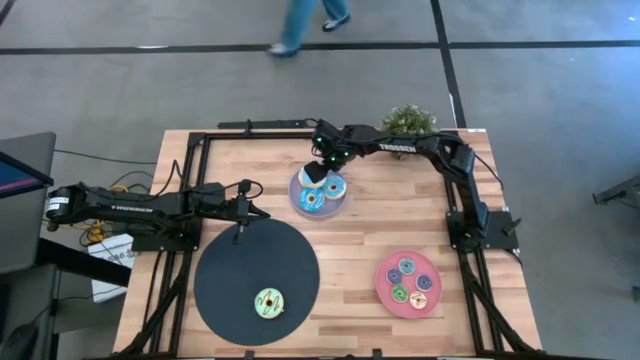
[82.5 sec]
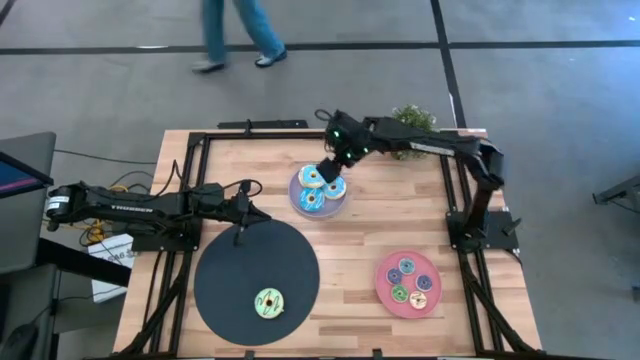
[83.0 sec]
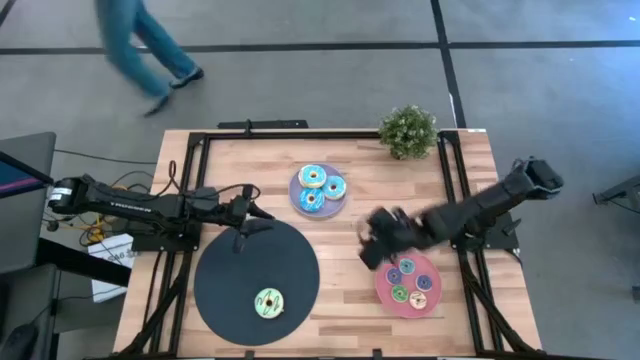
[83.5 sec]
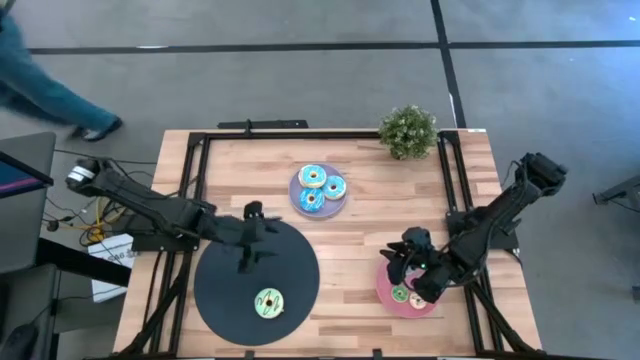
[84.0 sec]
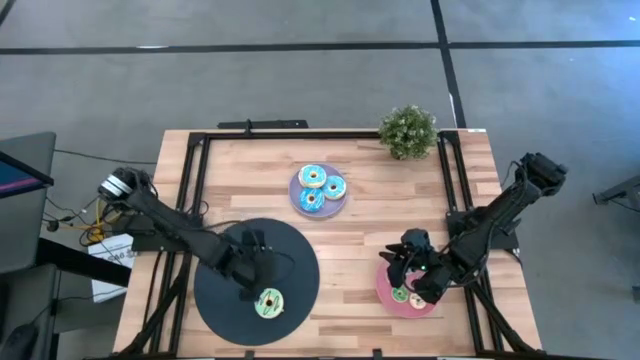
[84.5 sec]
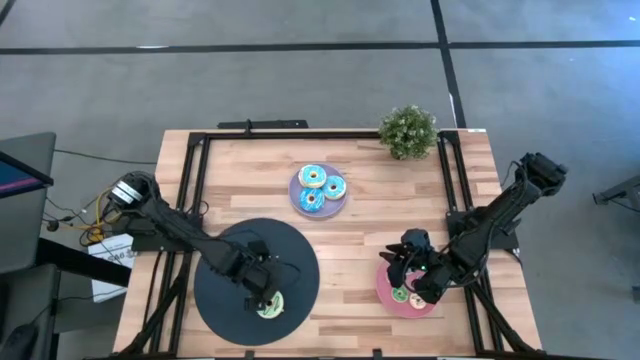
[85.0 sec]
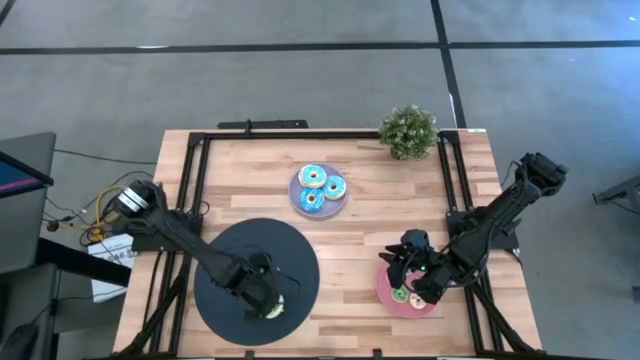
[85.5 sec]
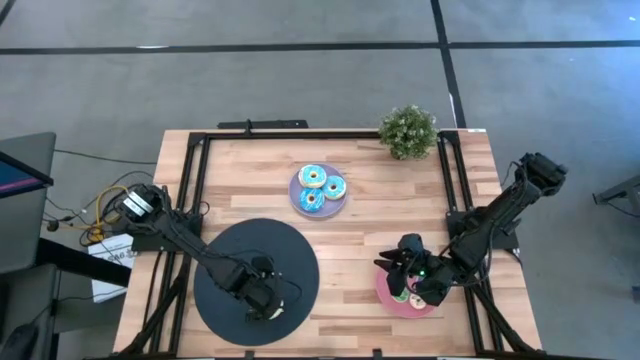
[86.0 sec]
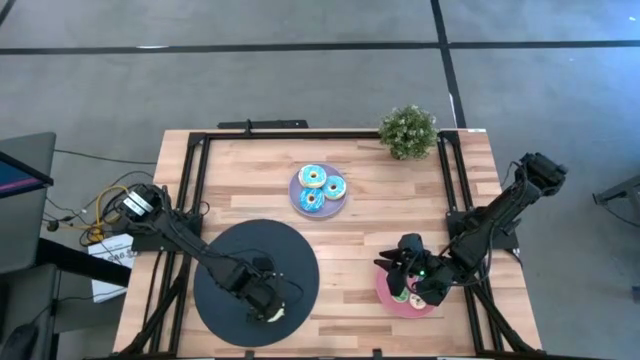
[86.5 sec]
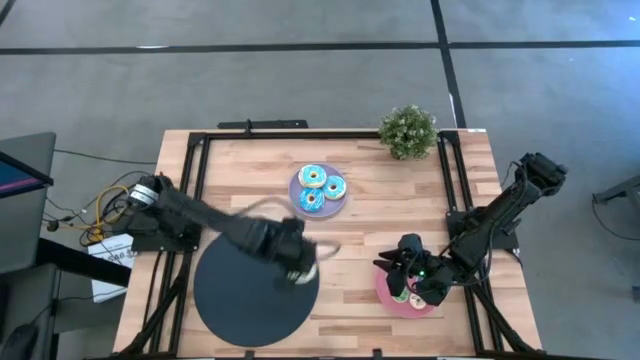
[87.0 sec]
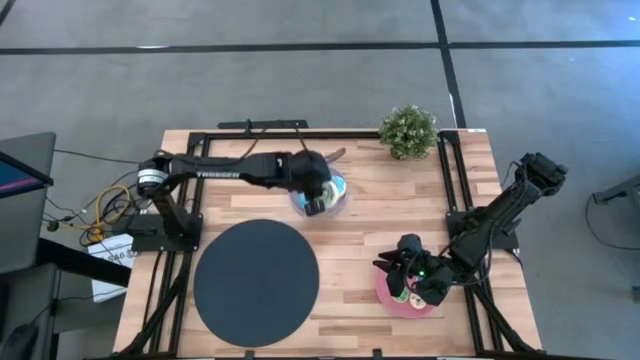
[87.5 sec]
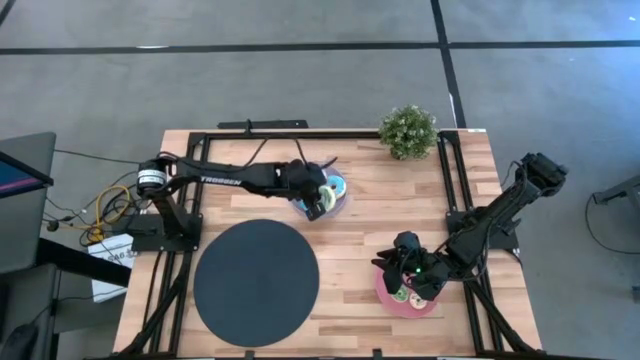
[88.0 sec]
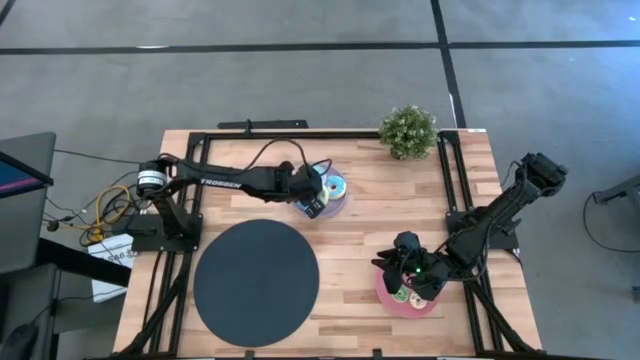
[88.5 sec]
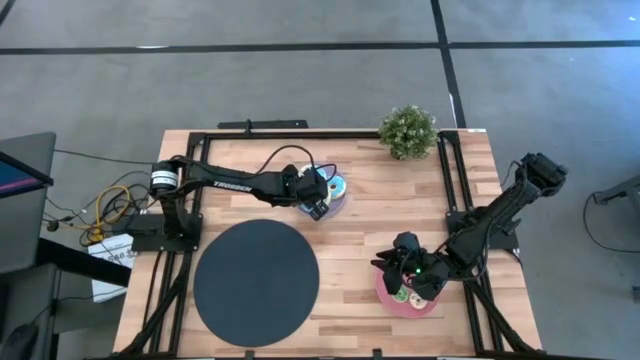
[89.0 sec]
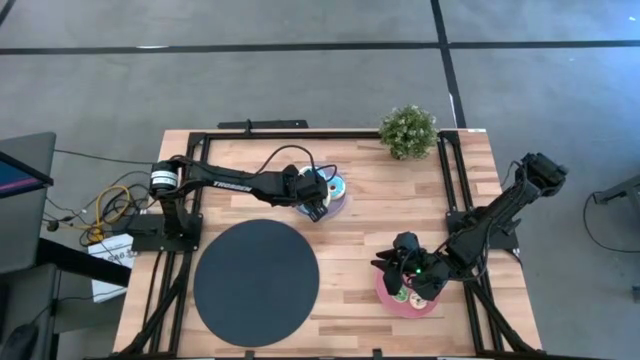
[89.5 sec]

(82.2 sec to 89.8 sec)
Task: Pick & Place donuts
Put the large light green donut on the purple plate

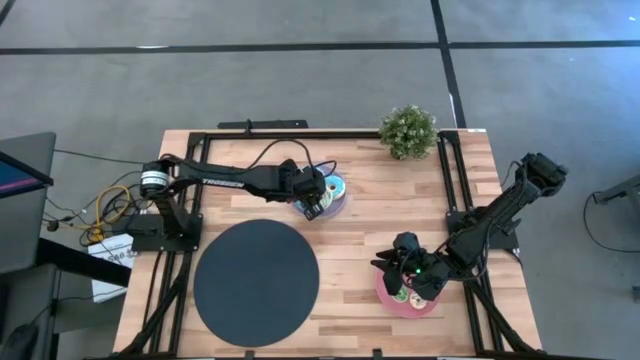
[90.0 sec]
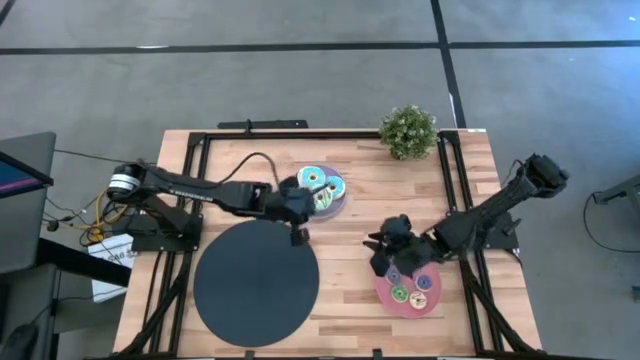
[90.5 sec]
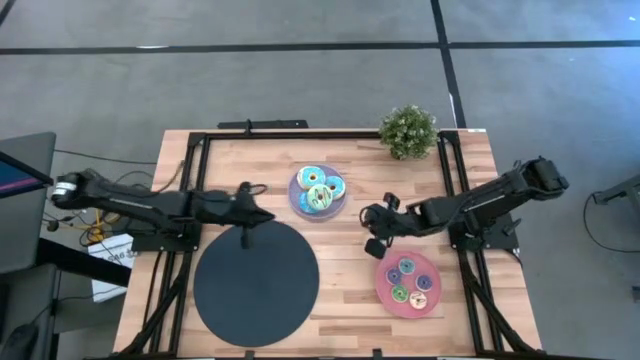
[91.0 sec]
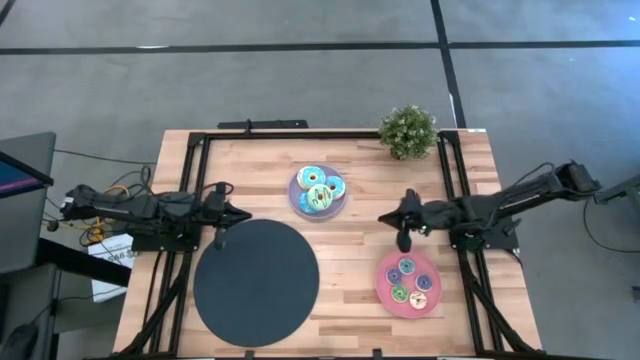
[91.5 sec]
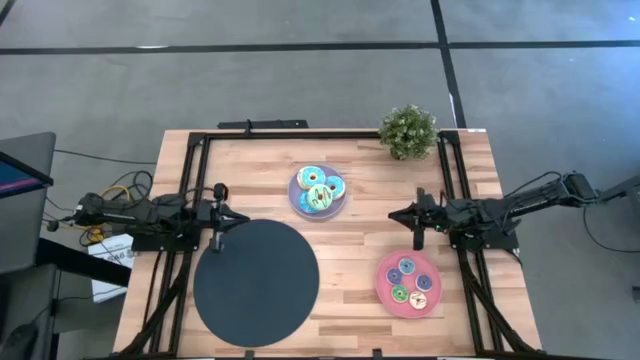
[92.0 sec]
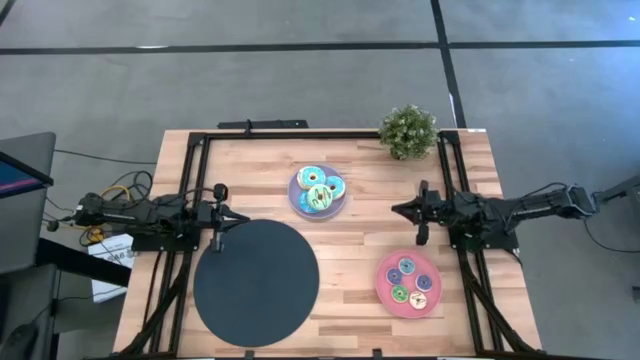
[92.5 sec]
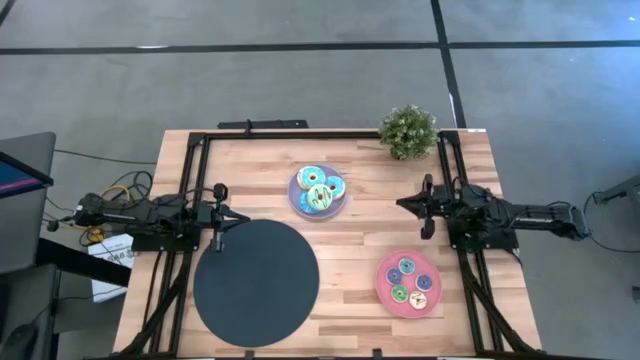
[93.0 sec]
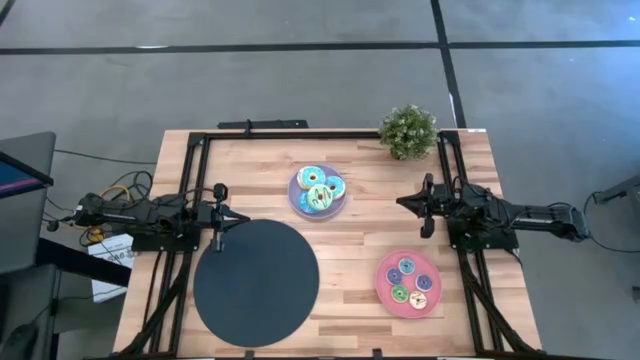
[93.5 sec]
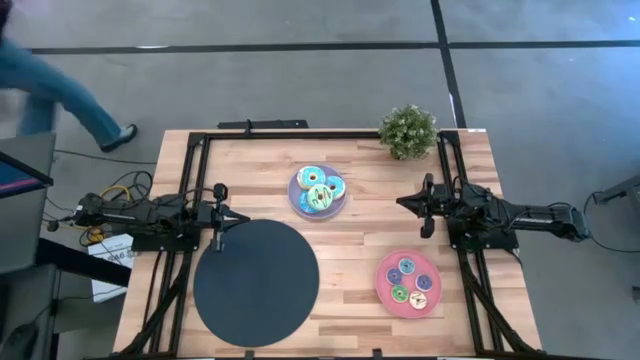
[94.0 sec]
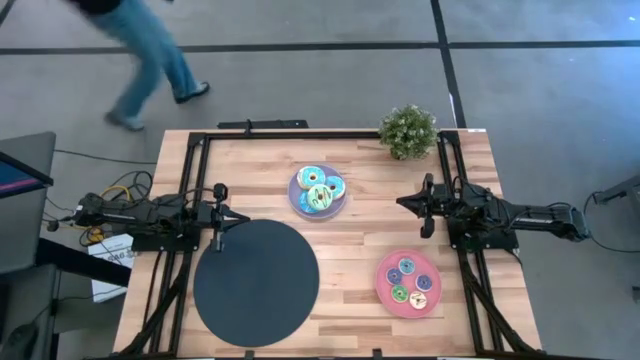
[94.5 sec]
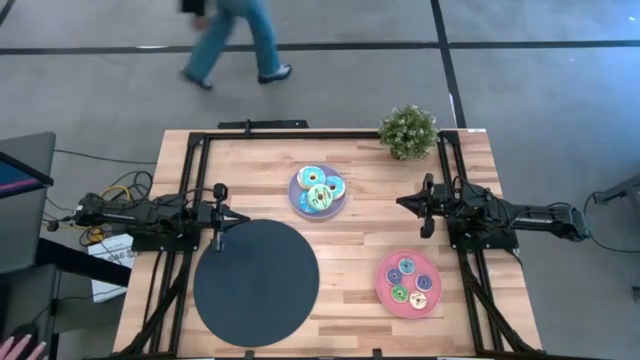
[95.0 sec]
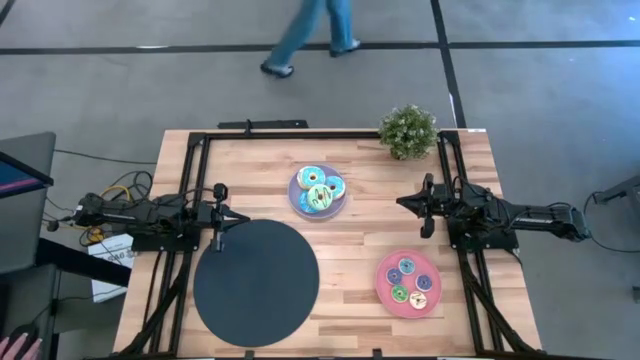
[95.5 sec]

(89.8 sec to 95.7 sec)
Return to Home Position

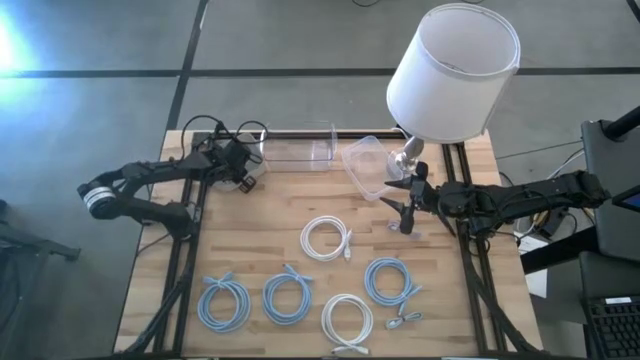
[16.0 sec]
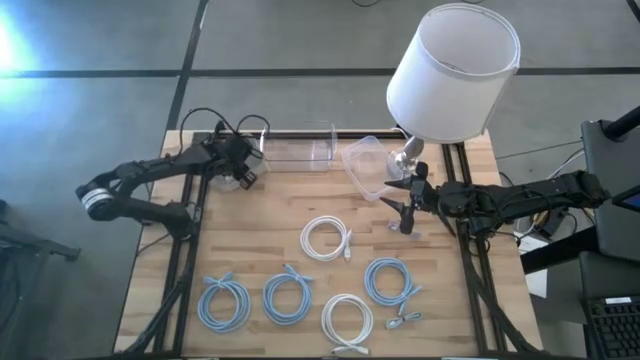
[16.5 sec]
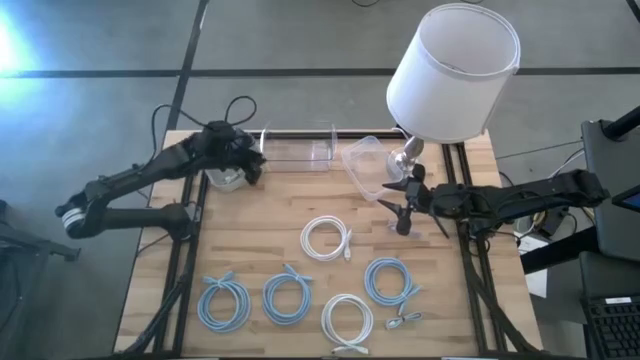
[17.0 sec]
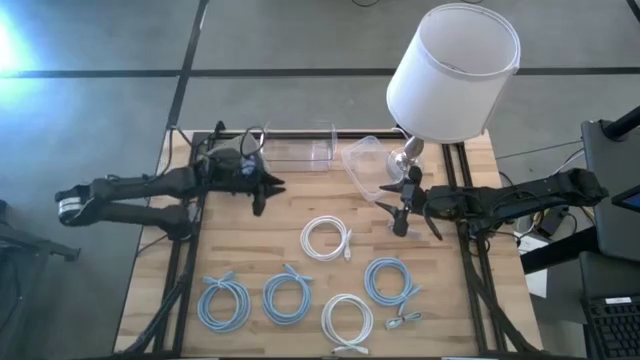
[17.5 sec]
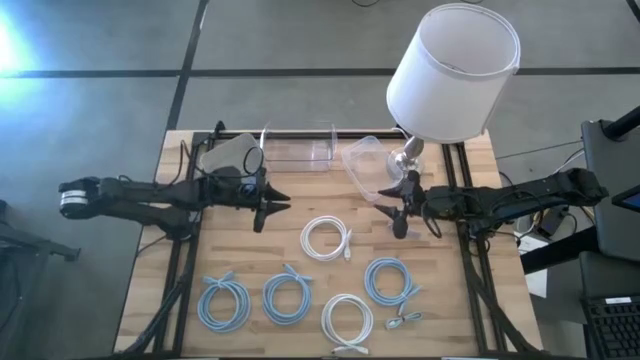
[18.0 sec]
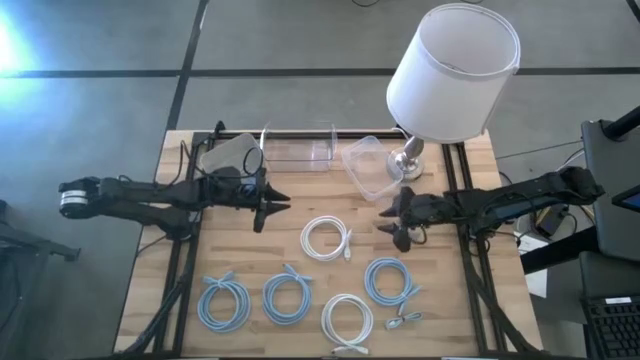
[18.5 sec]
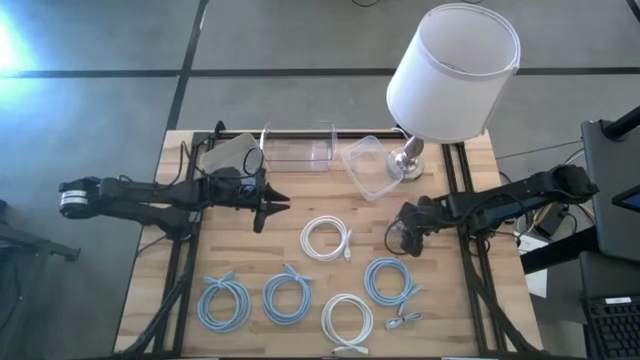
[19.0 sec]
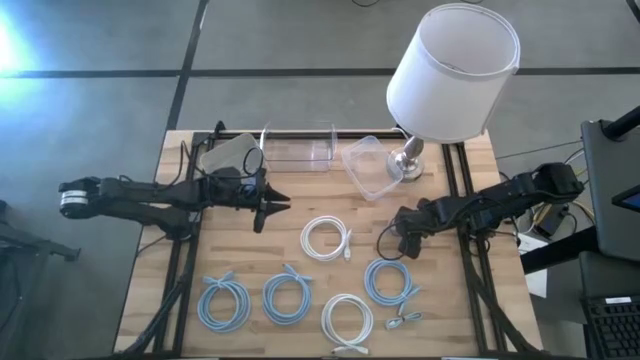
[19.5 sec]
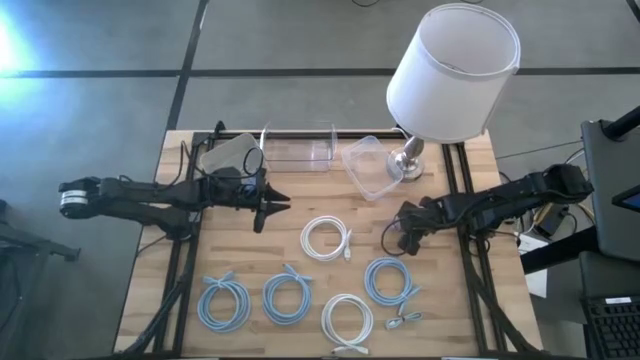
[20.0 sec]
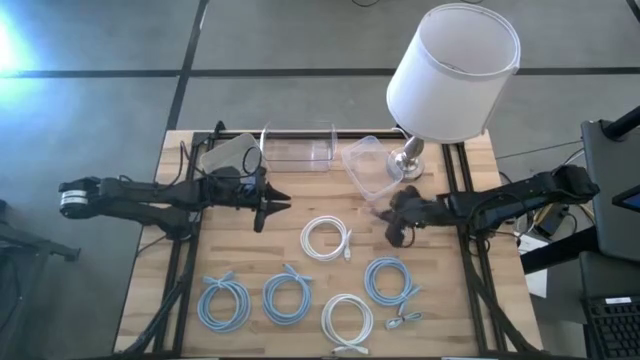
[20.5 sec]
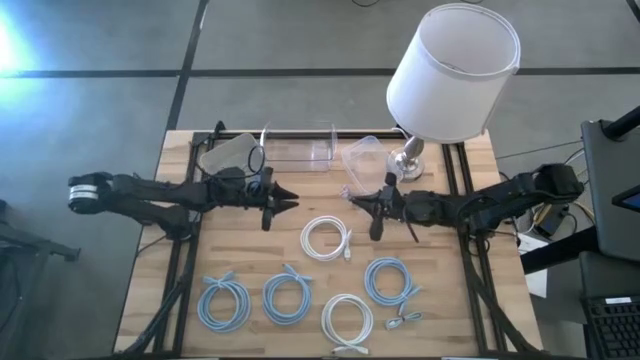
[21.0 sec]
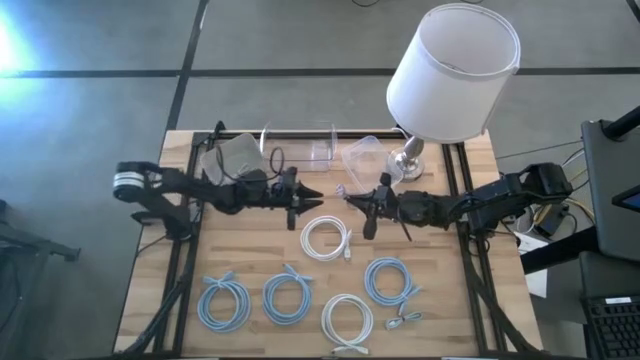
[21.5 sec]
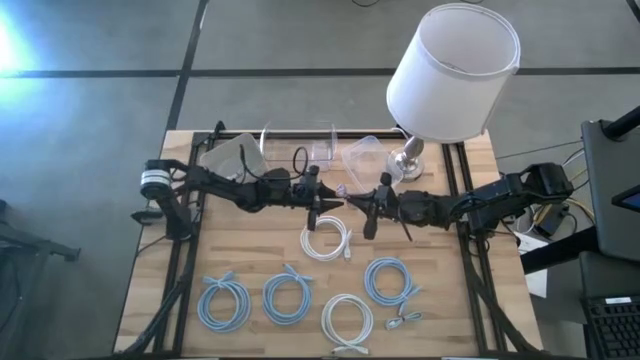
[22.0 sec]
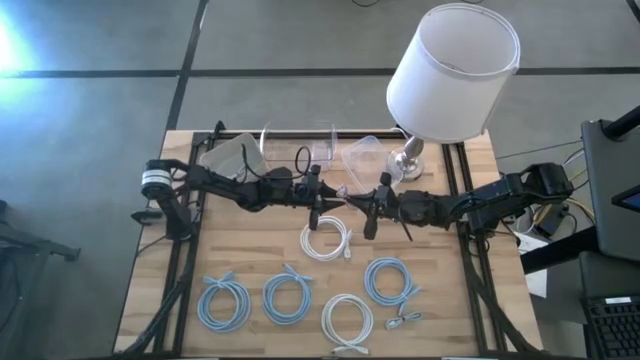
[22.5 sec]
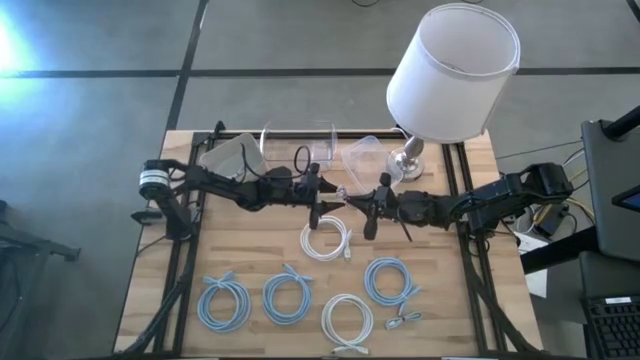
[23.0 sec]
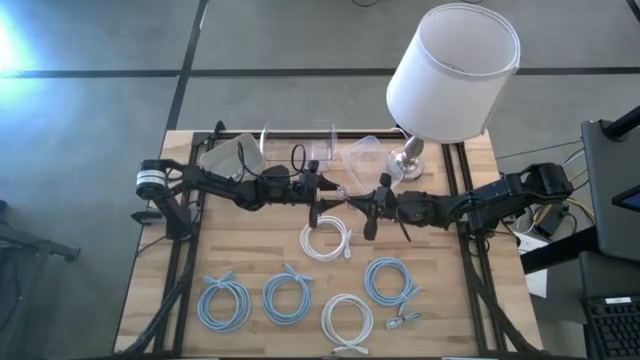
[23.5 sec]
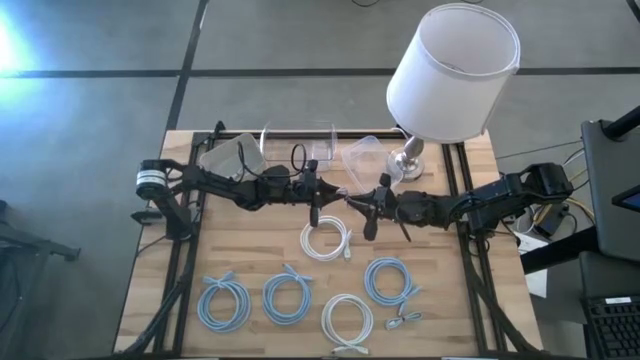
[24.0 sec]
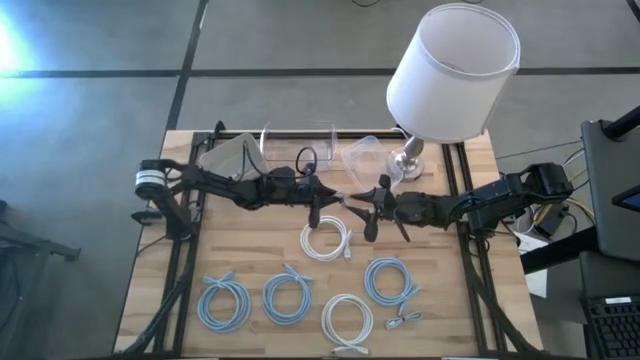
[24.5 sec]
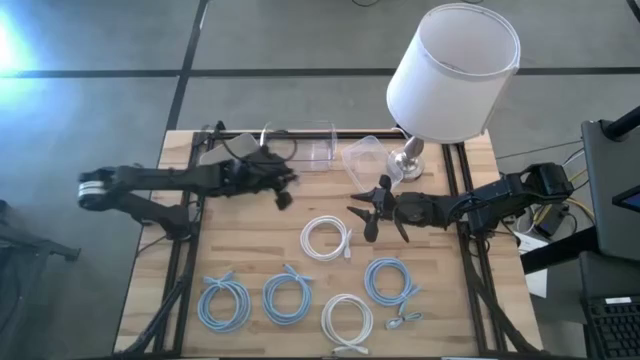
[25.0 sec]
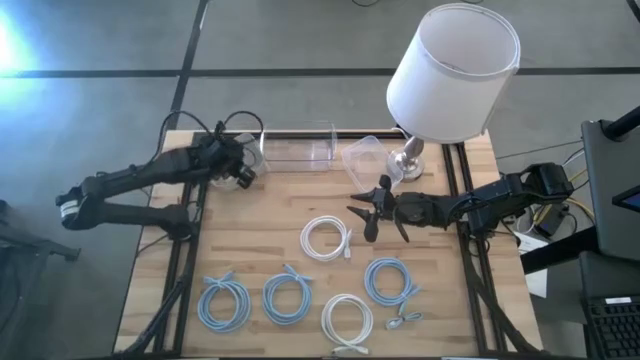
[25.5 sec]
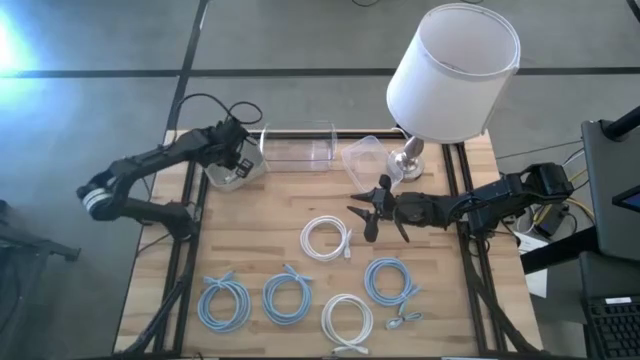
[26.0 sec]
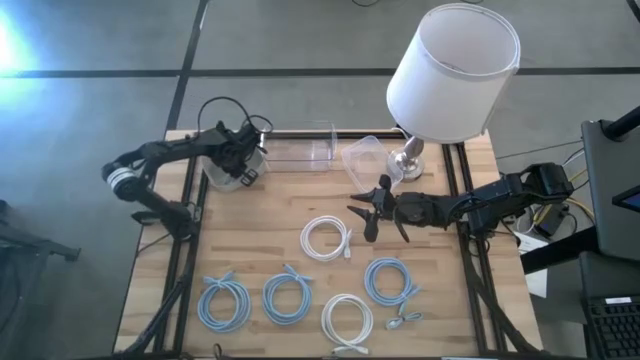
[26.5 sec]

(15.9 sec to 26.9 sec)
Task: Pick & Place USB Port
Put the purple charger cable into the gray bin
